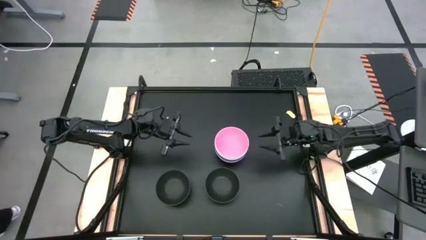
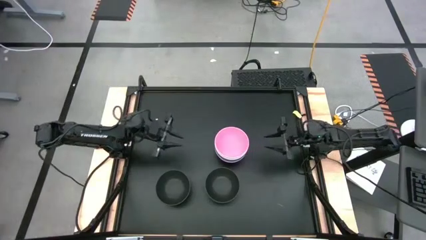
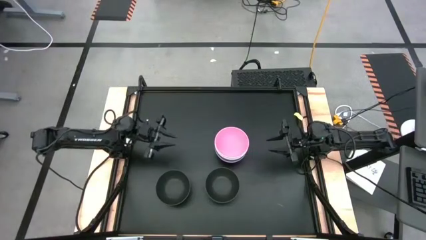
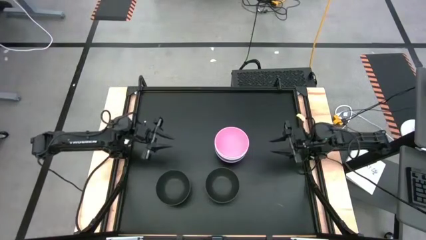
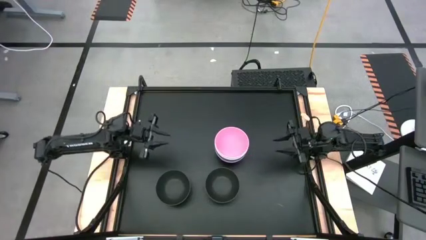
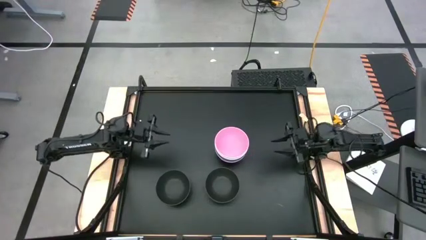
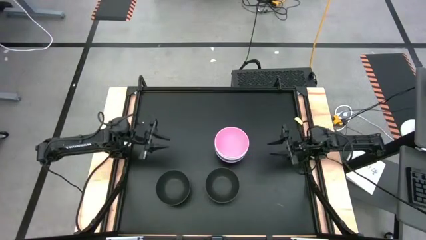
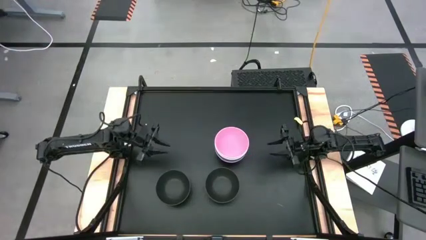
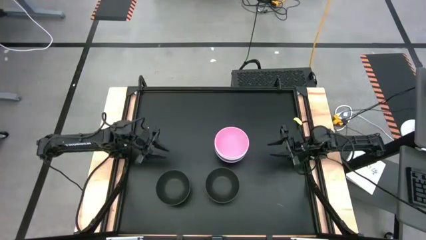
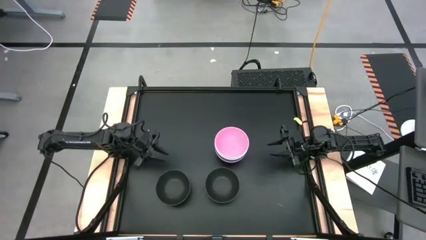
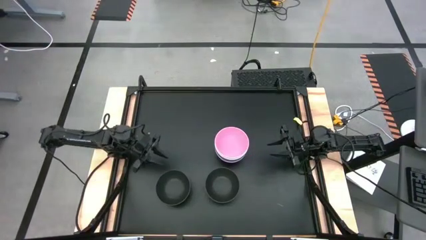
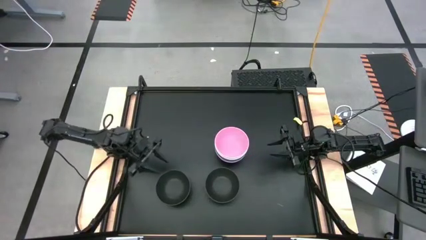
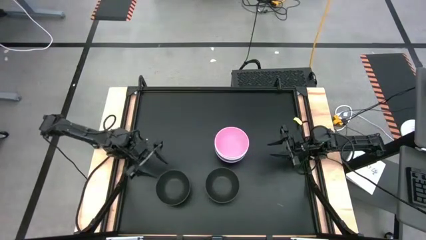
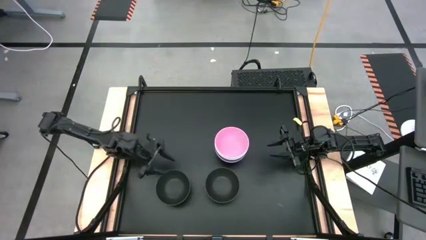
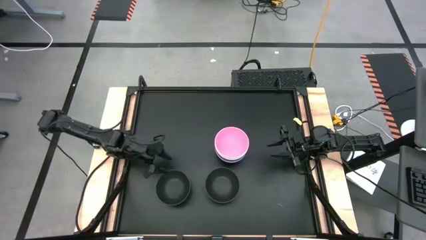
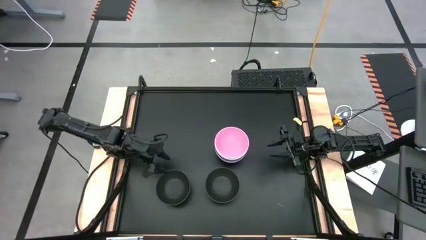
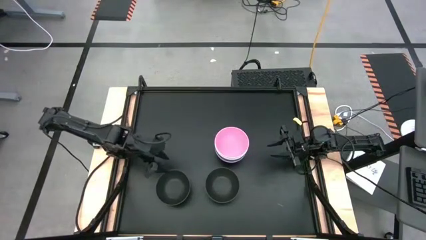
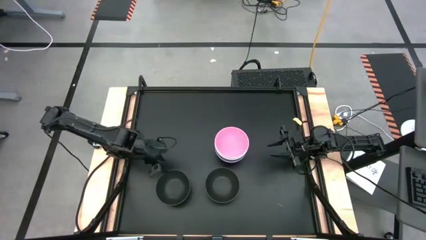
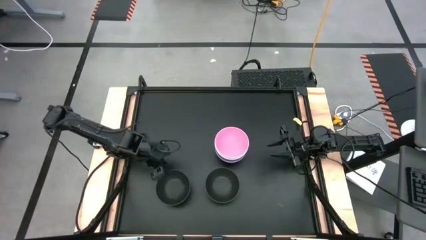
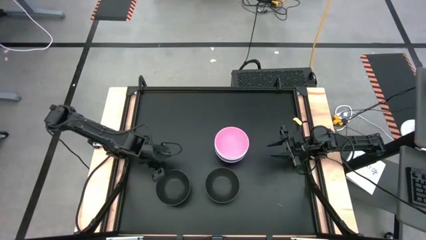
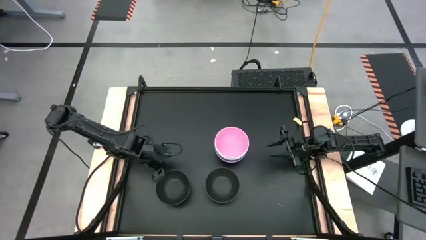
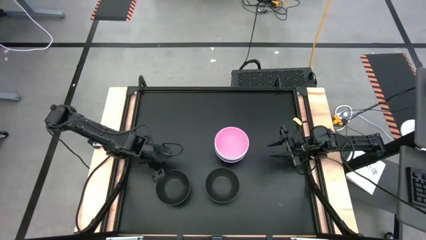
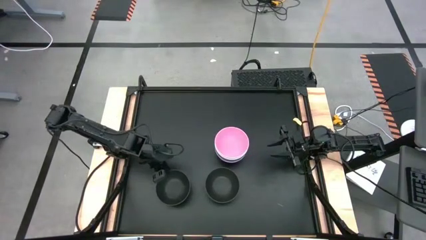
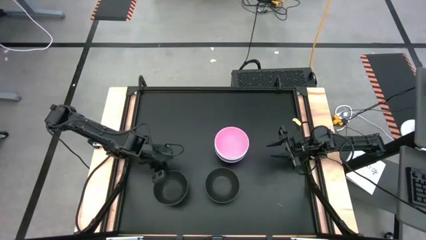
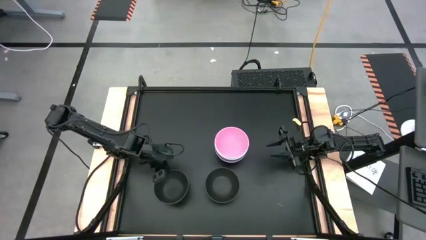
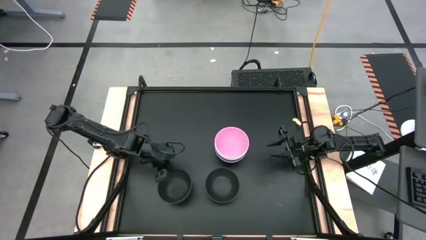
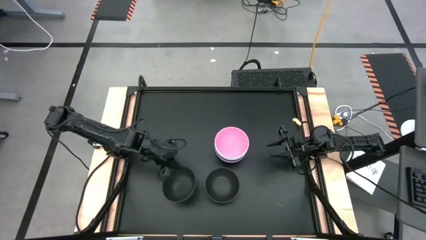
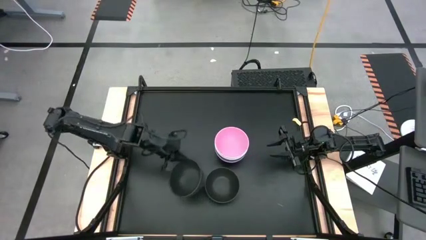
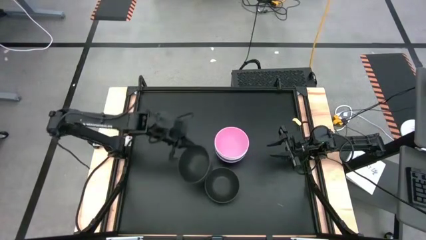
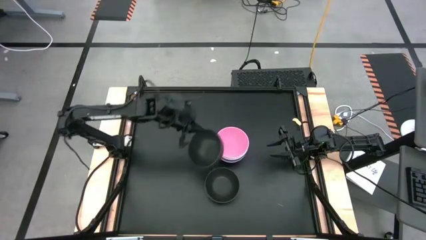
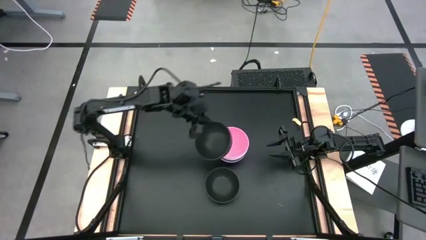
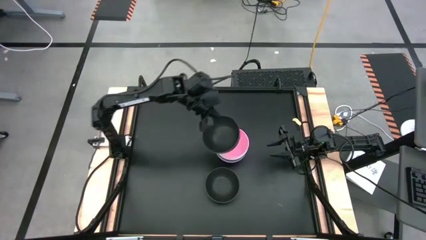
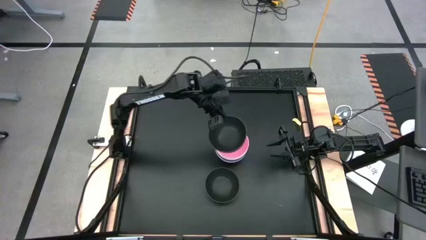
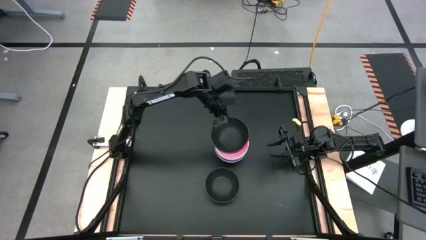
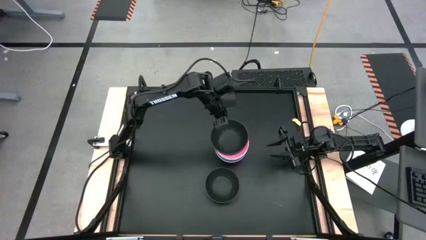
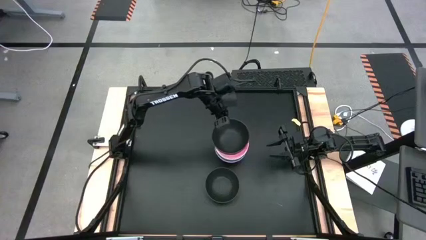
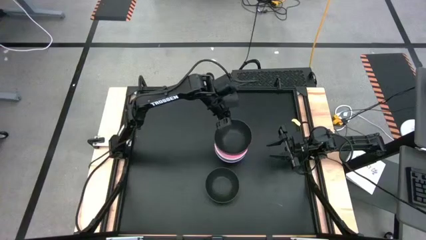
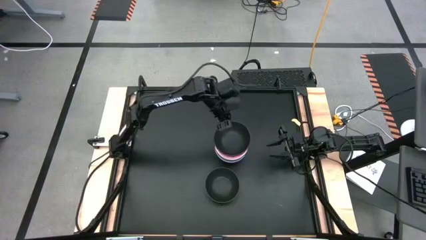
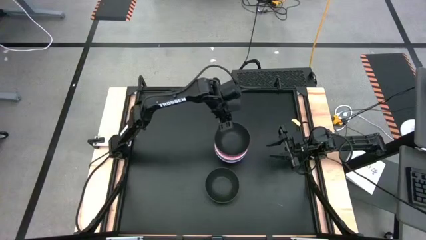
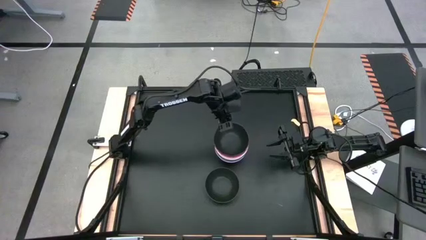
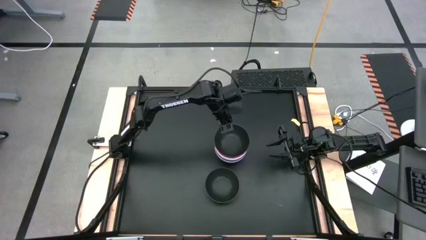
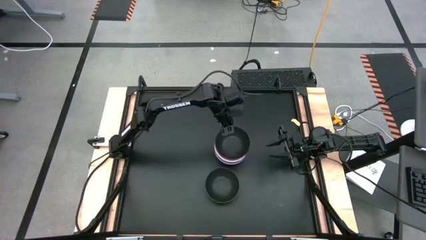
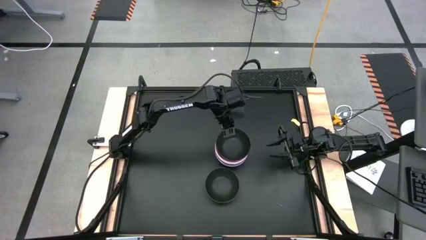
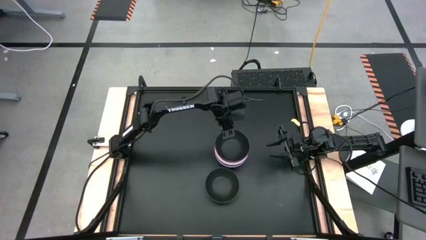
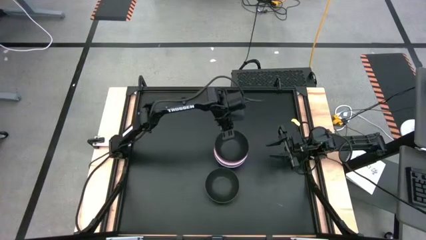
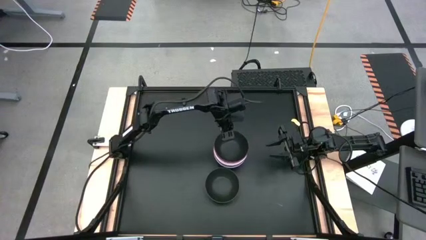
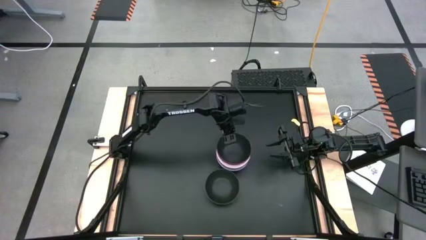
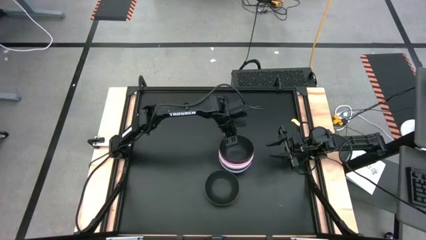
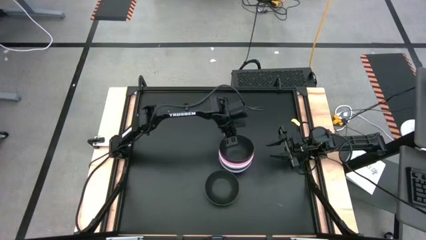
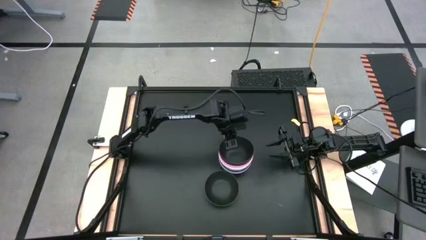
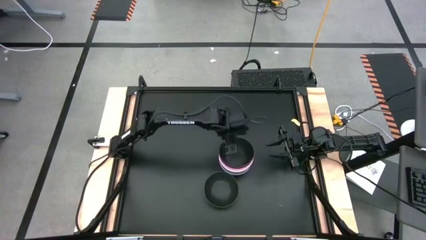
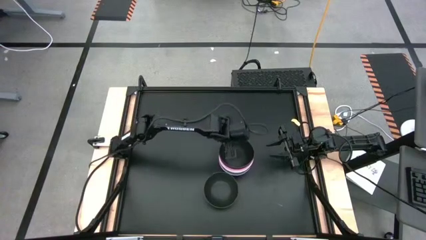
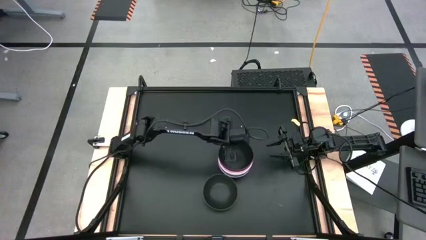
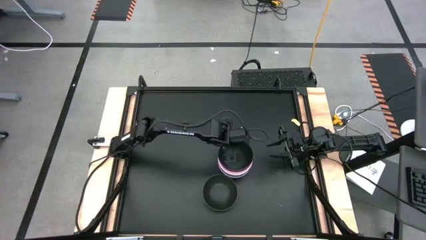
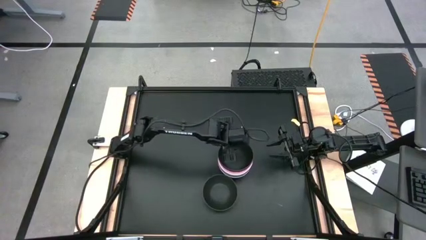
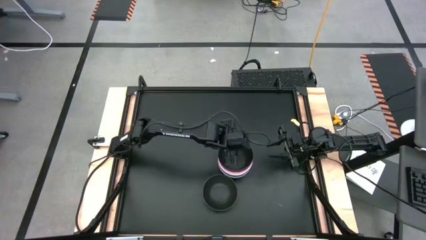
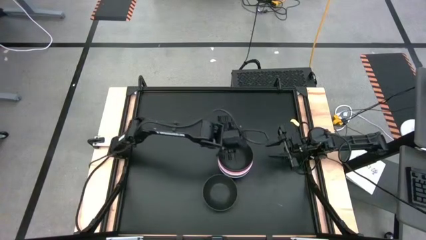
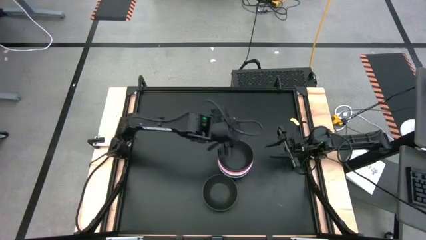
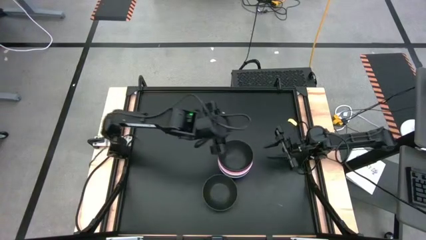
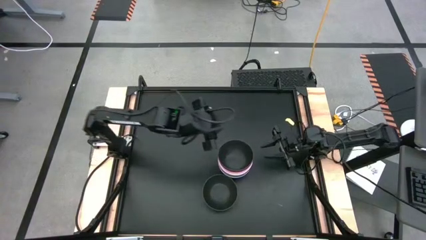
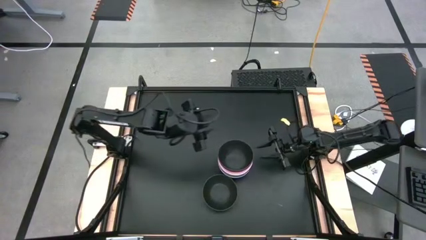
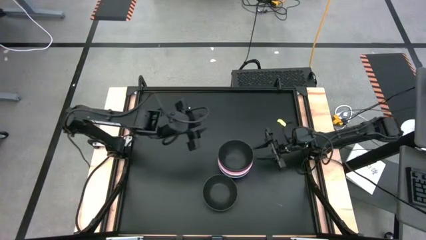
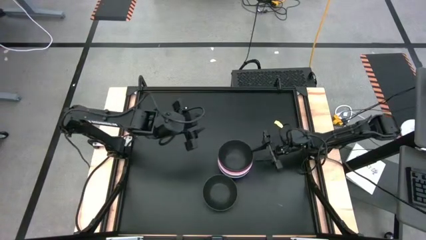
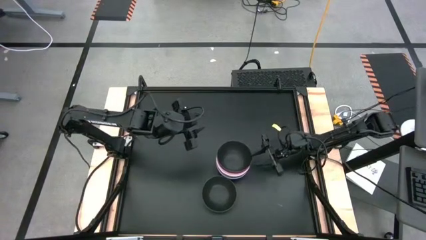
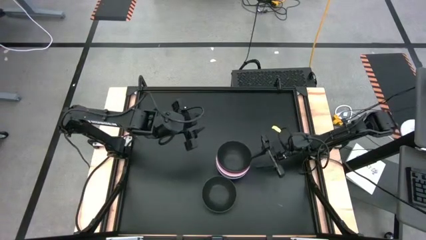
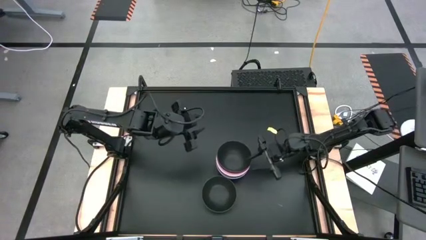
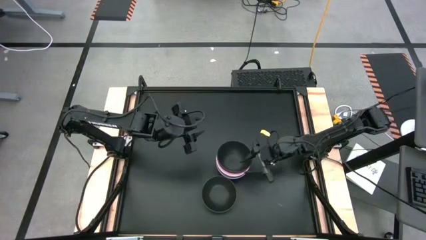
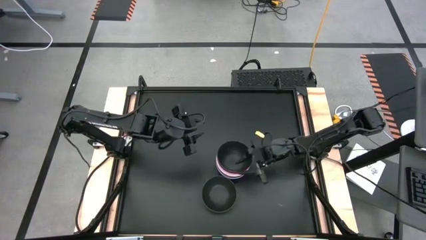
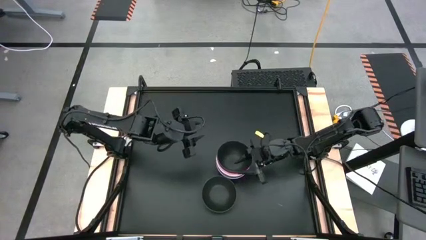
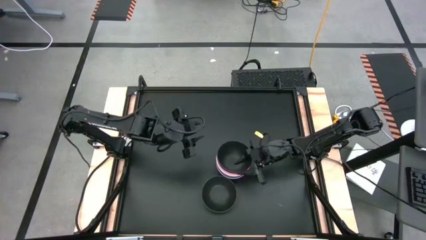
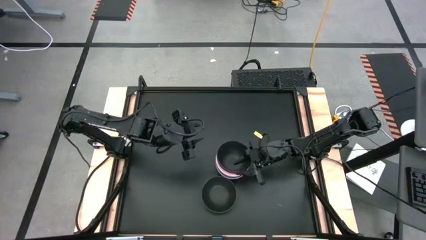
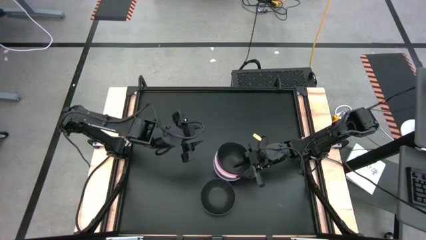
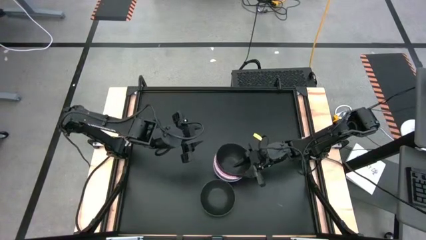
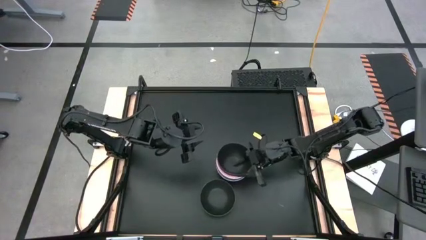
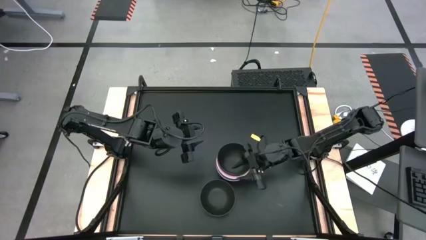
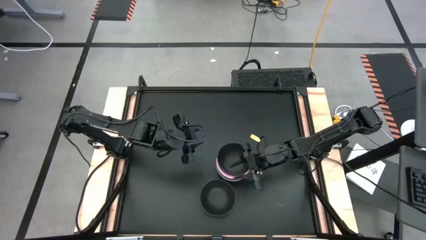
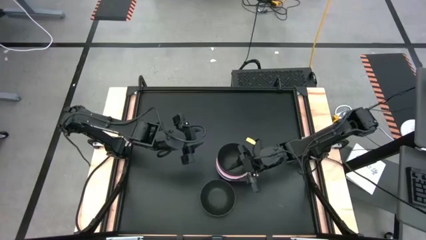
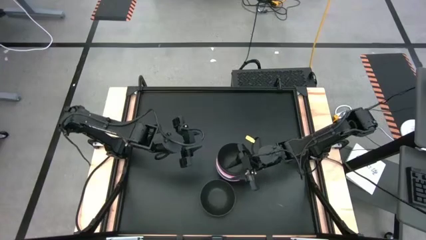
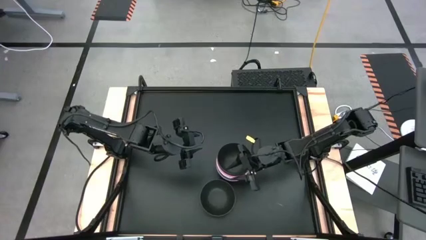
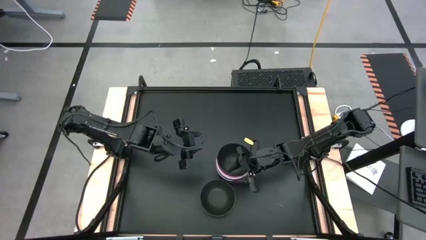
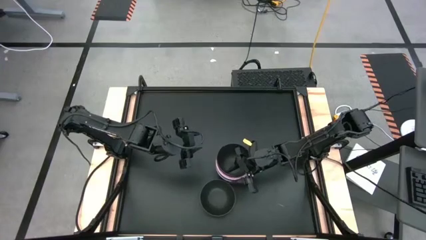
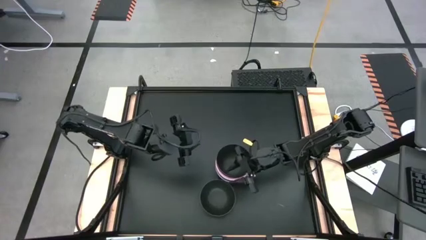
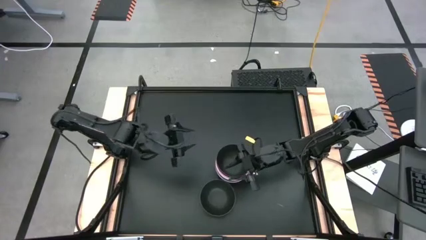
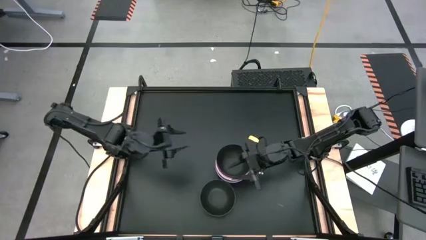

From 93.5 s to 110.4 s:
Task: Nest bowls inside each other
Stack the left black bowl on top of the pink bowl
